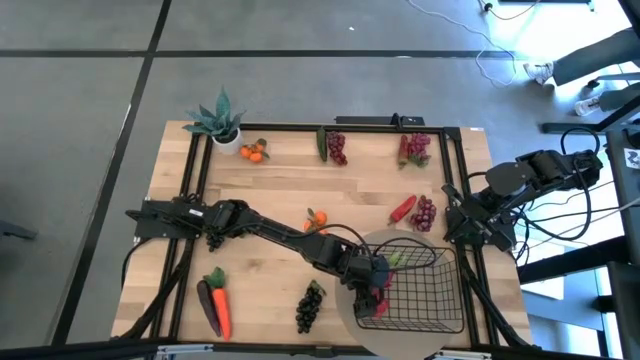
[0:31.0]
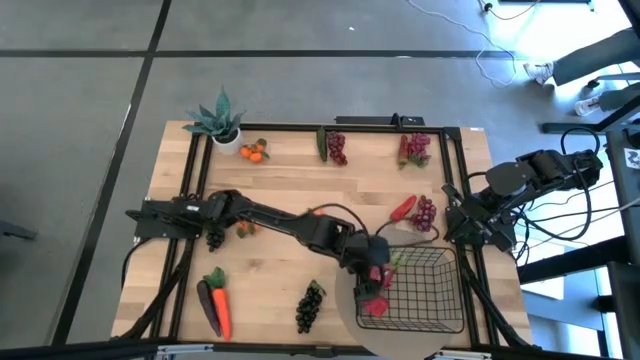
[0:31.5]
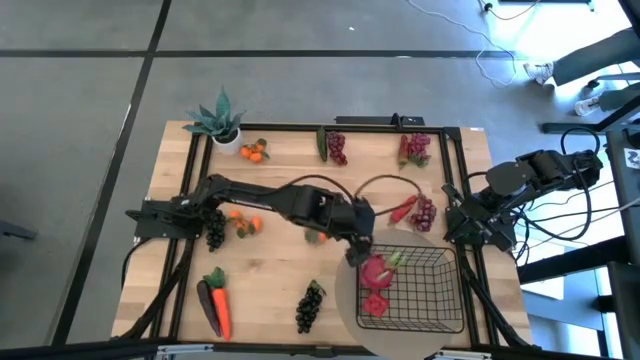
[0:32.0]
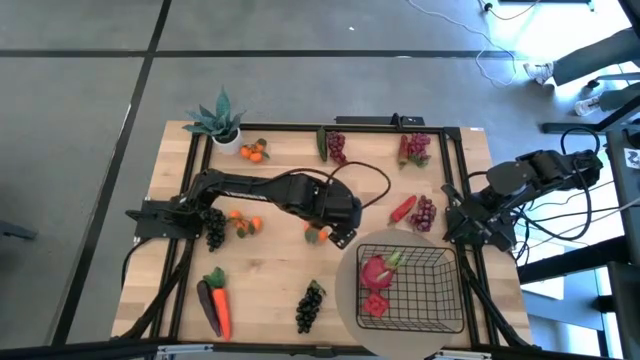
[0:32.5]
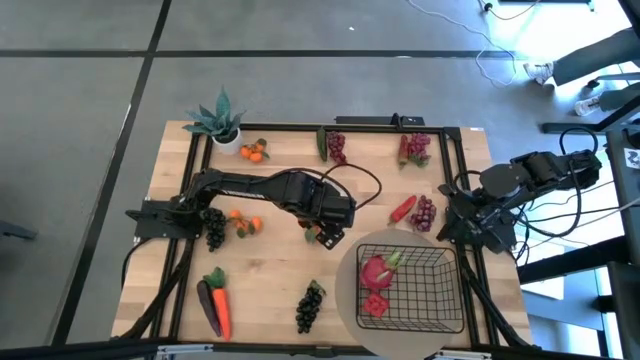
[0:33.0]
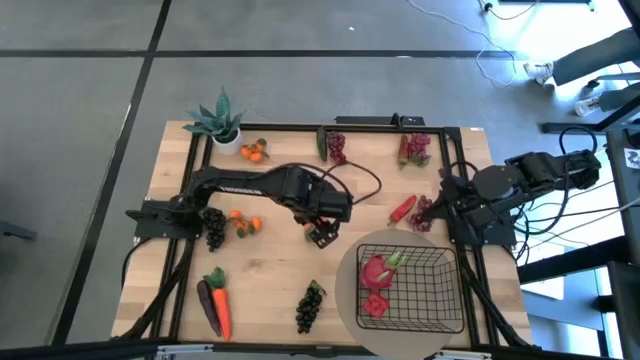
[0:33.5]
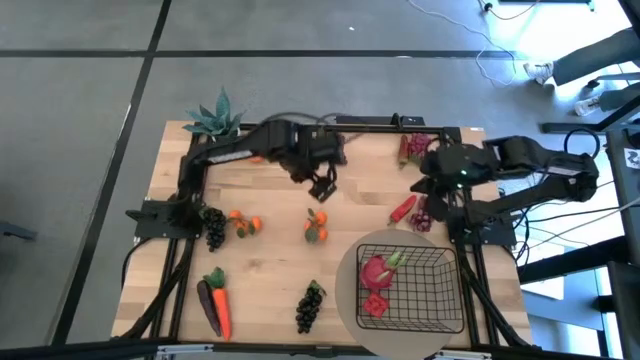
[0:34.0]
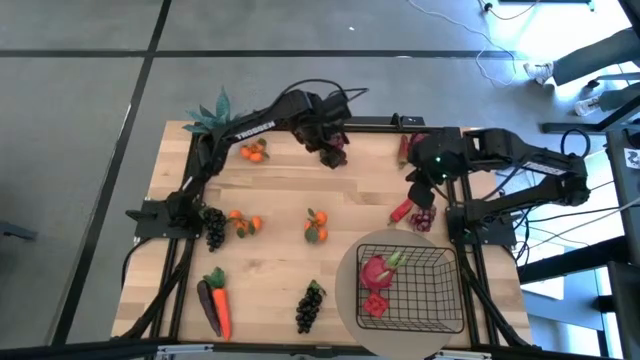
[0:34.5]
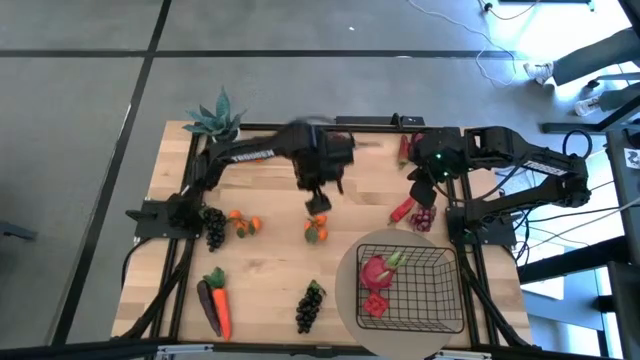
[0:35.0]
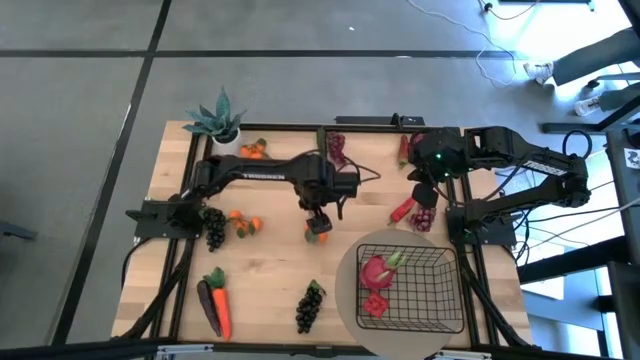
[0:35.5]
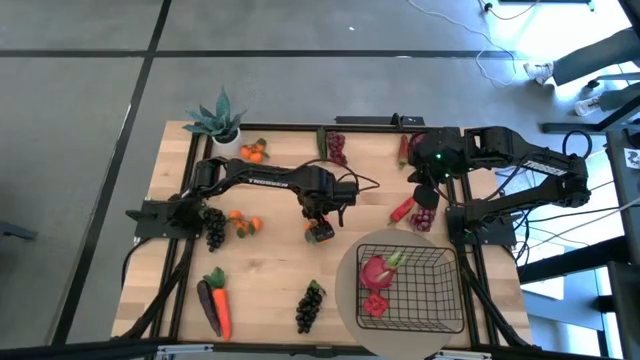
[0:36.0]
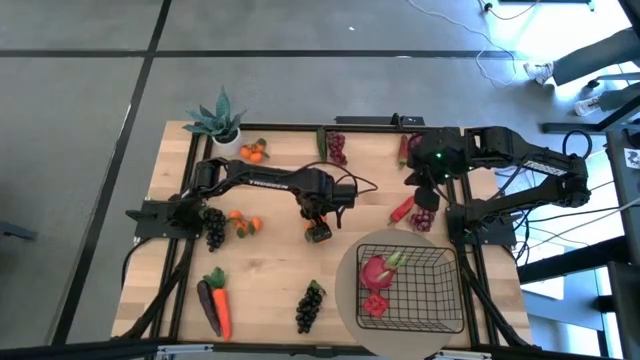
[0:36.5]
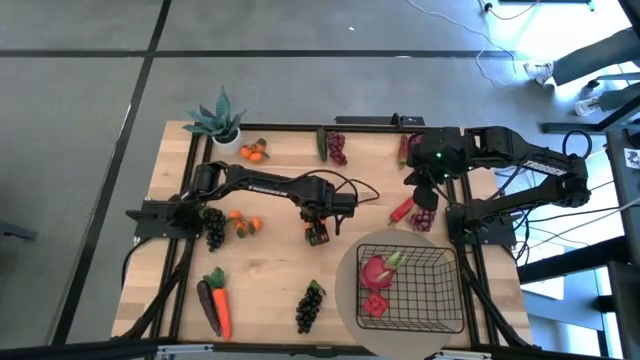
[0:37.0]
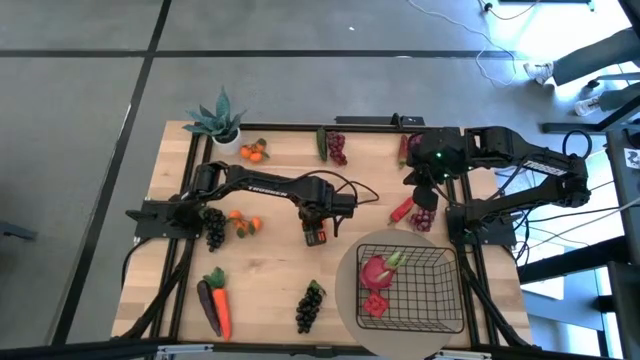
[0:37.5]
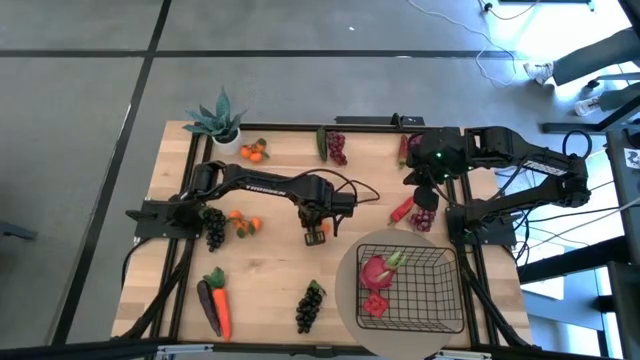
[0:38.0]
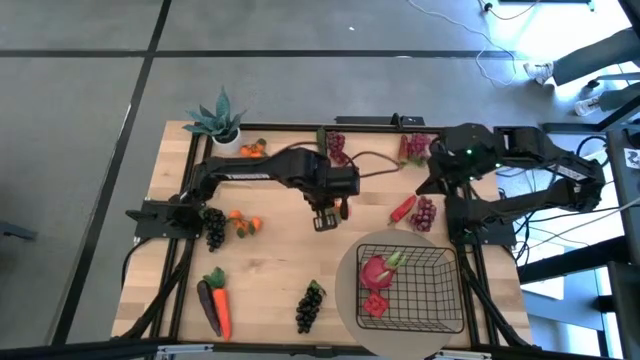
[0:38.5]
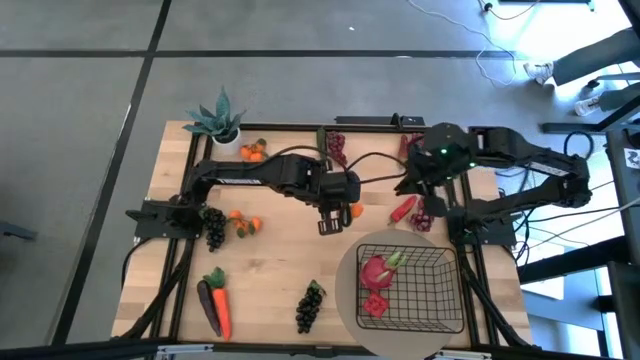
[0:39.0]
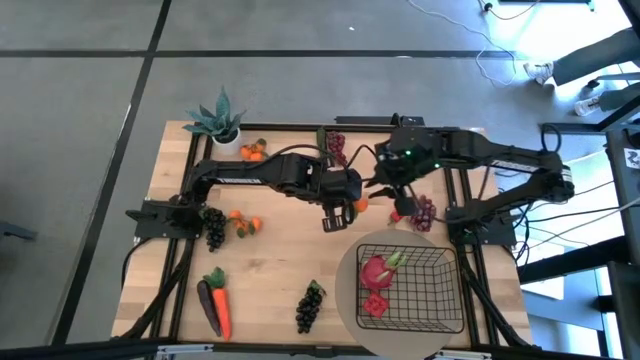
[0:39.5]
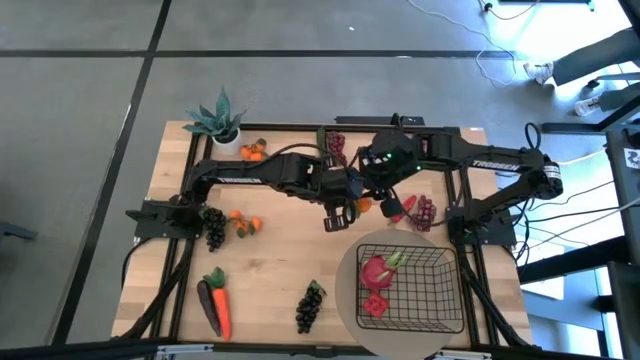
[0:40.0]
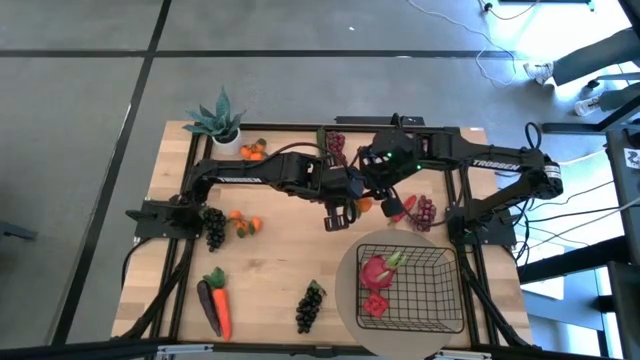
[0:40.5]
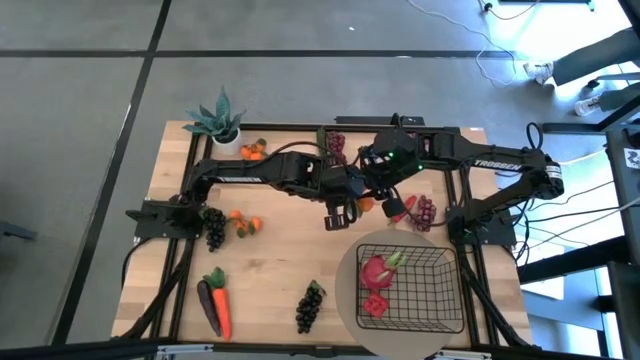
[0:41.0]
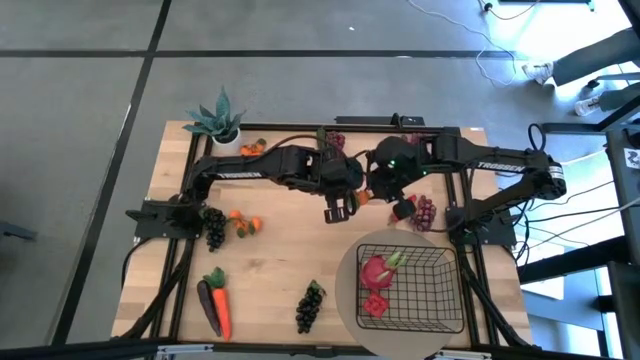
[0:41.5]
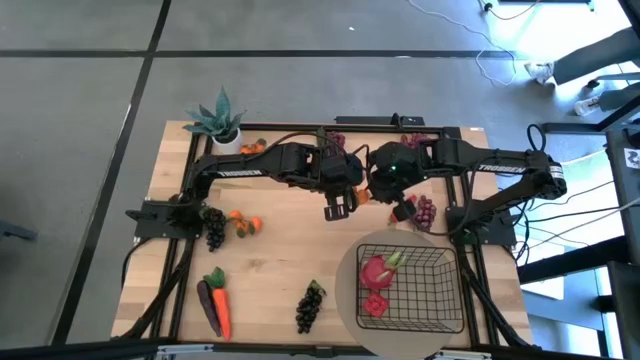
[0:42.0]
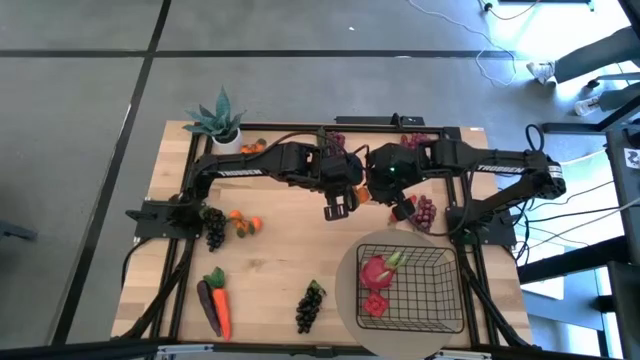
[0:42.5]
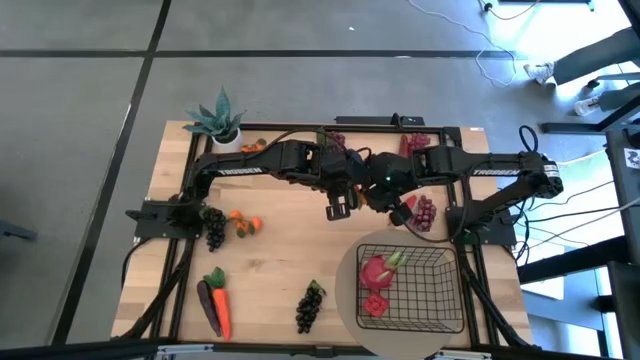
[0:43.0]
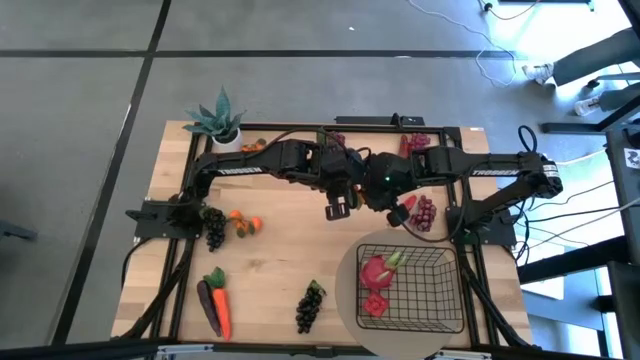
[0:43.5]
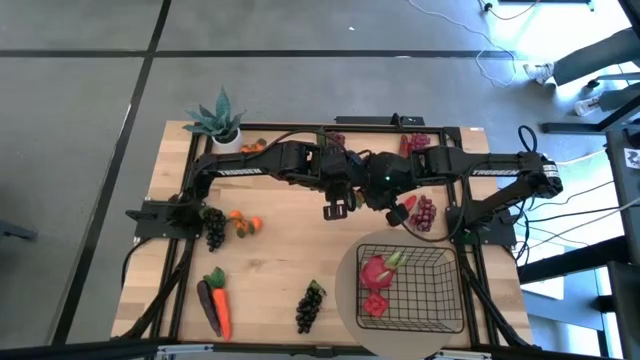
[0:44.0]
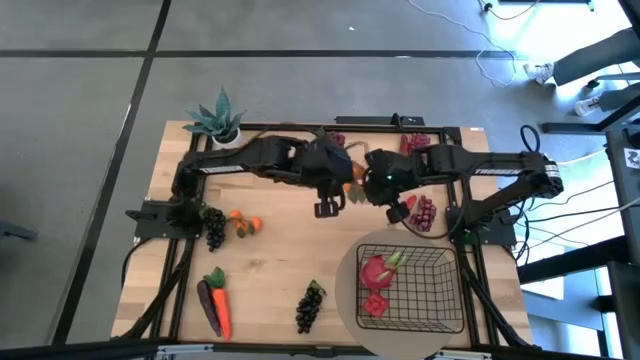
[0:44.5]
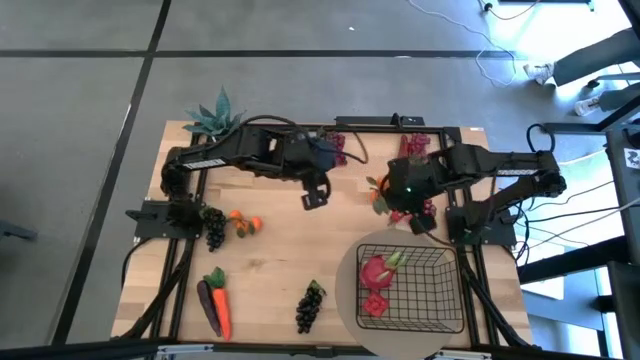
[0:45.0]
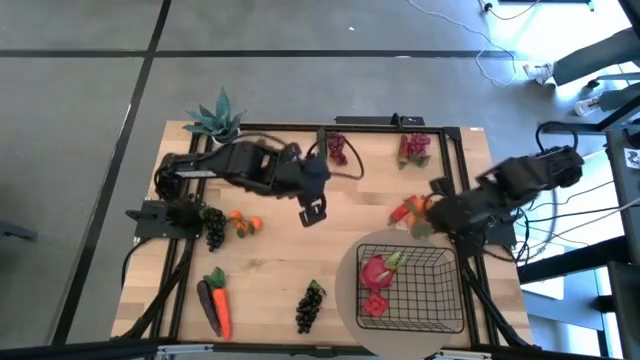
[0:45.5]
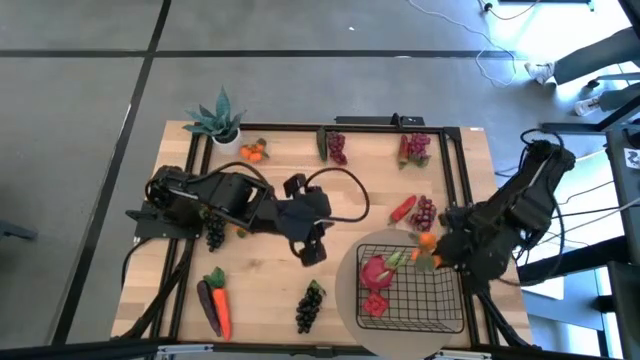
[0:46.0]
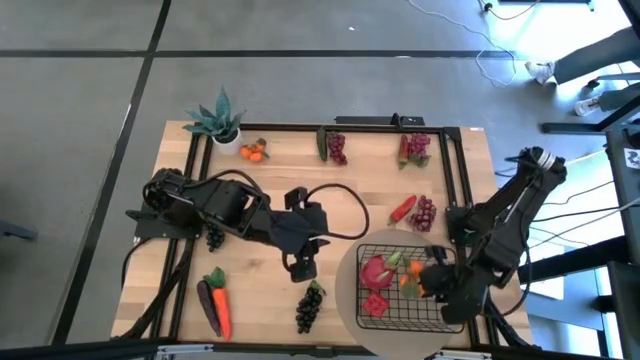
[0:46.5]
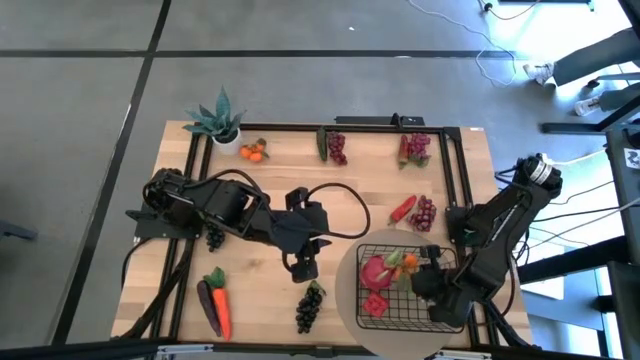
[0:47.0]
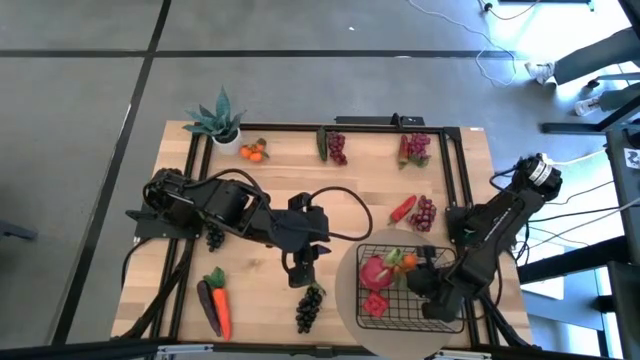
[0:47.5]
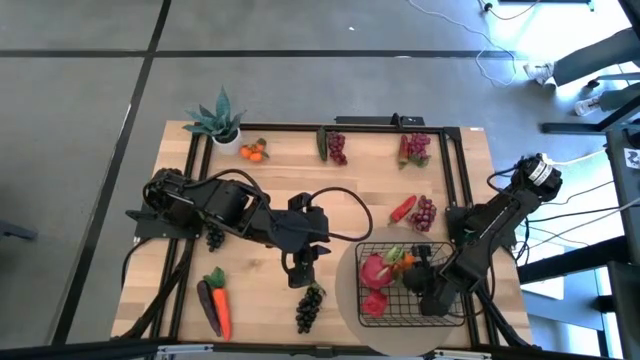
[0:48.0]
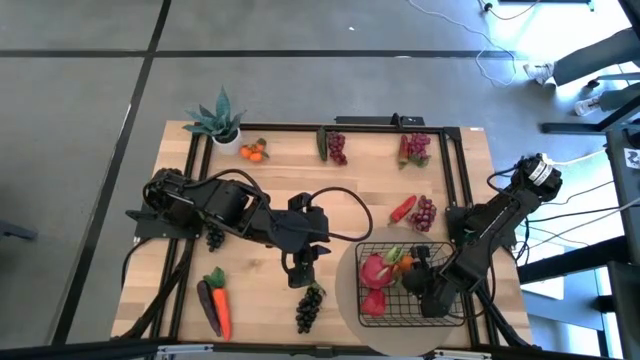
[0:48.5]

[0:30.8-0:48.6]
Task: Build produce basket
Put the bottom right tangerines into the black wire basket

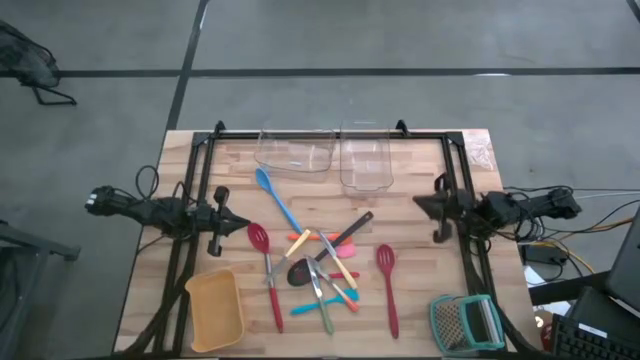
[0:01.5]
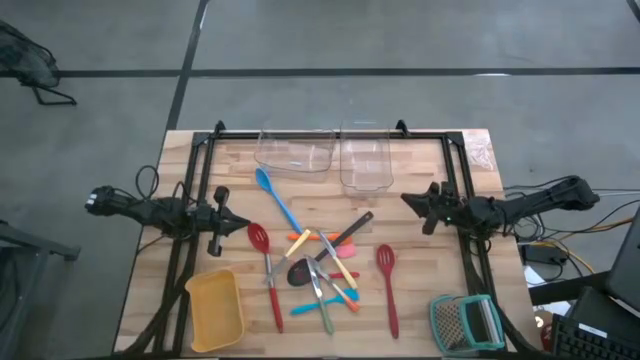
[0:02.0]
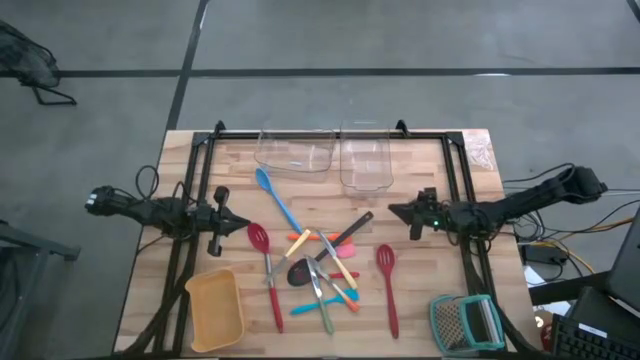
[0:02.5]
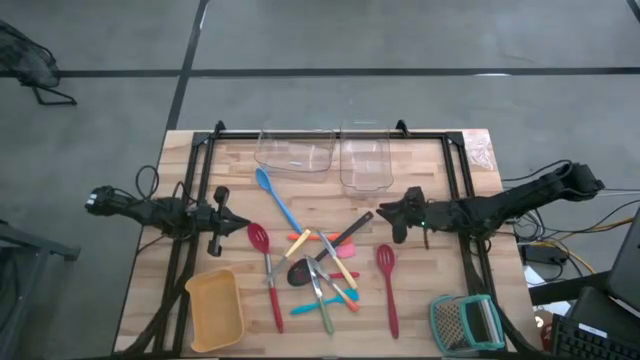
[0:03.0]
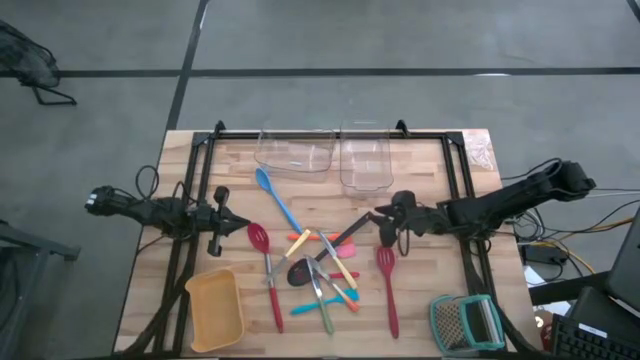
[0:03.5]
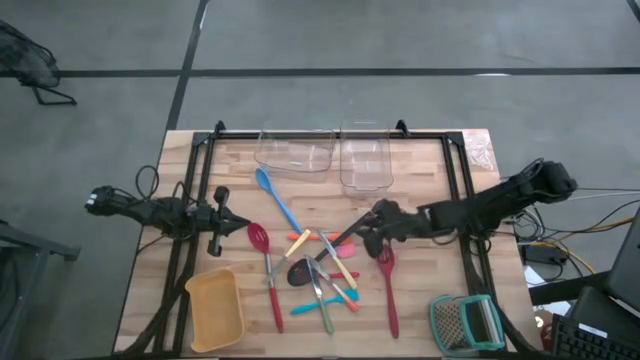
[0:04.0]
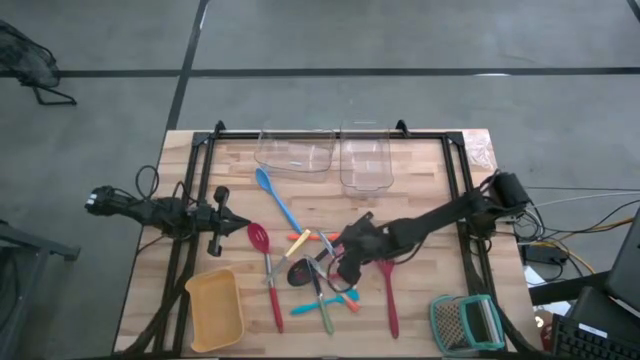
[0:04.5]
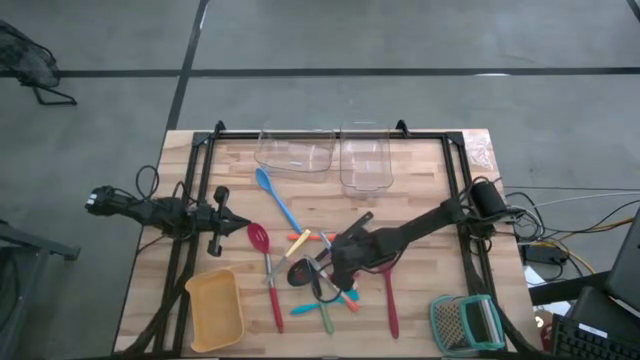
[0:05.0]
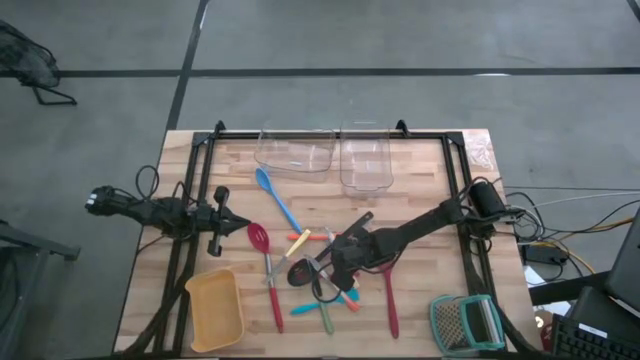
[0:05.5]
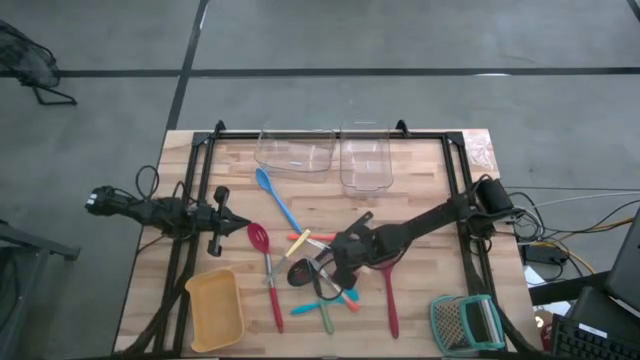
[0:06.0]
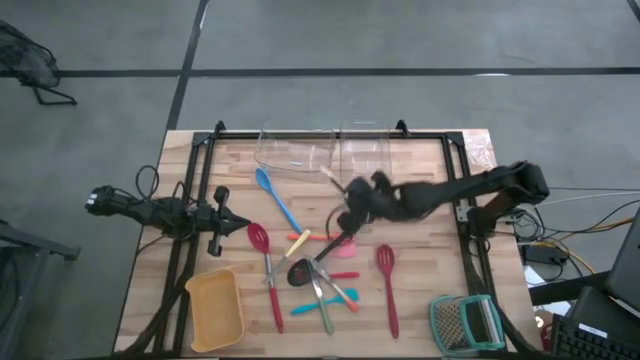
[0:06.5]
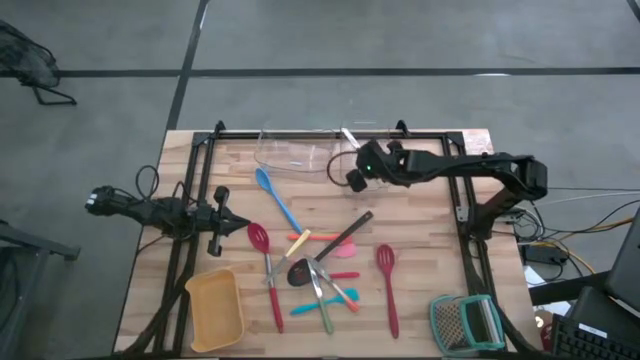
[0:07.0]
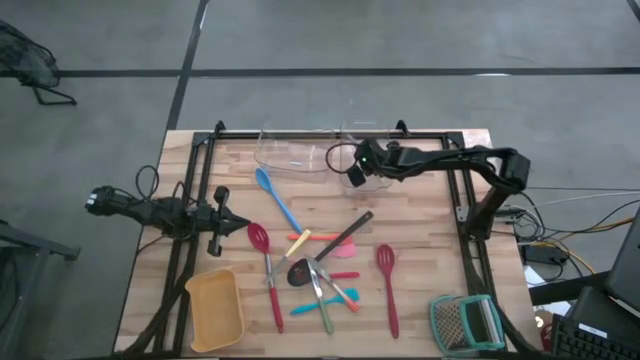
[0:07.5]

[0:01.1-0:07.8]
Task: Pick & Place Kitchen Items
Put the yellow knife into the right transparent bin
